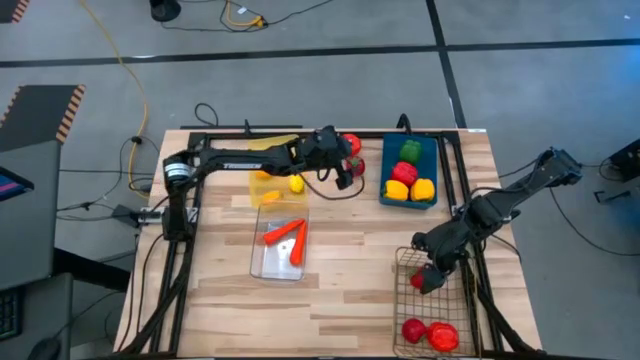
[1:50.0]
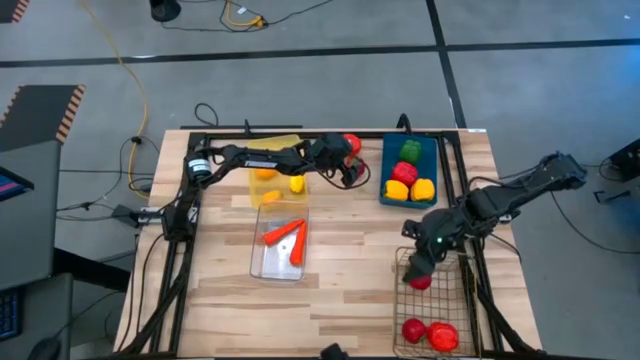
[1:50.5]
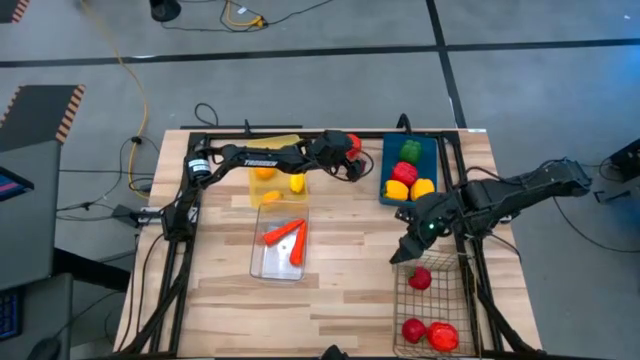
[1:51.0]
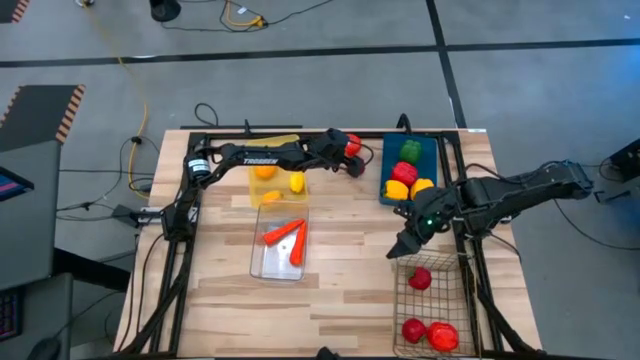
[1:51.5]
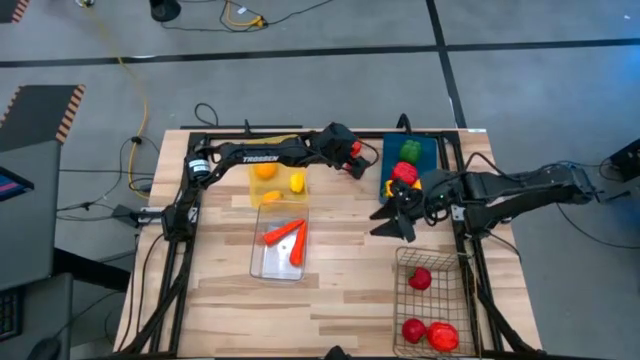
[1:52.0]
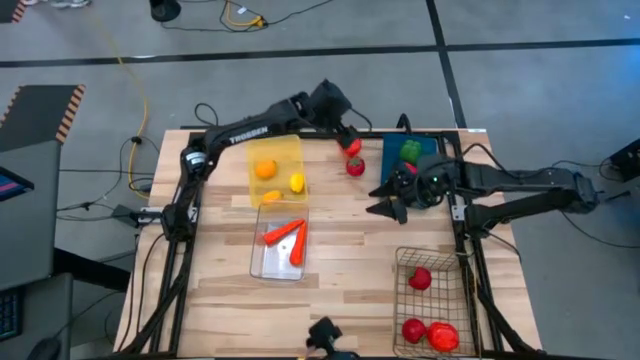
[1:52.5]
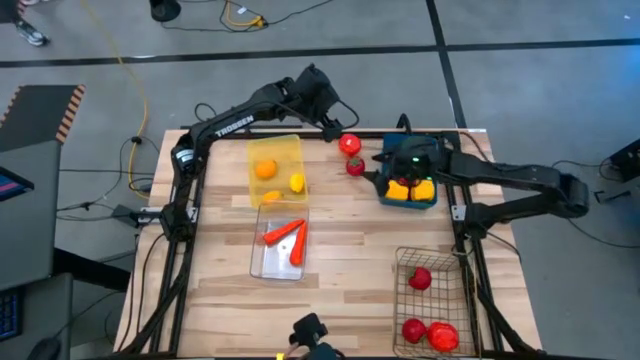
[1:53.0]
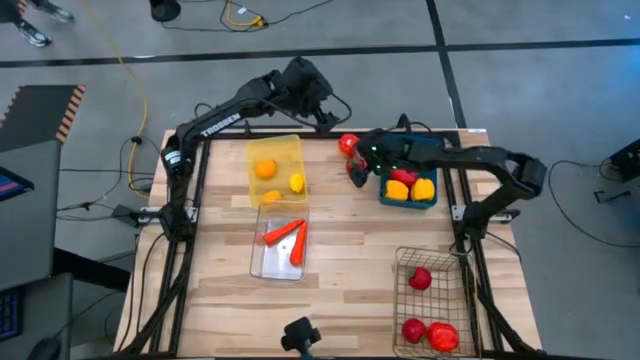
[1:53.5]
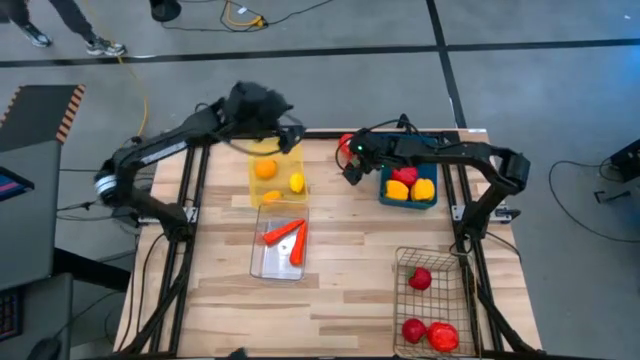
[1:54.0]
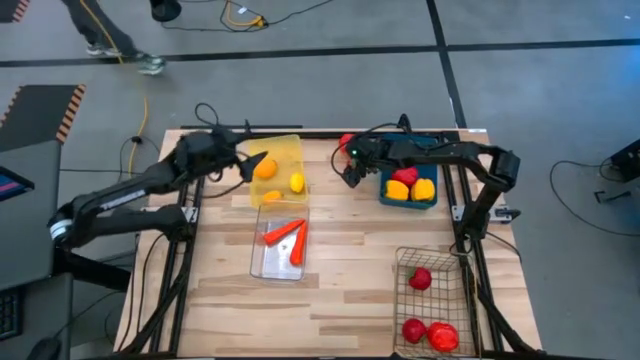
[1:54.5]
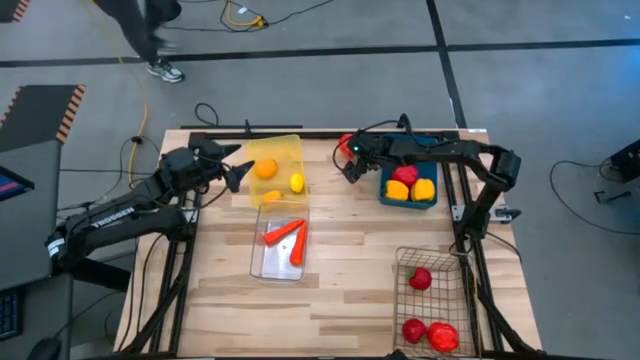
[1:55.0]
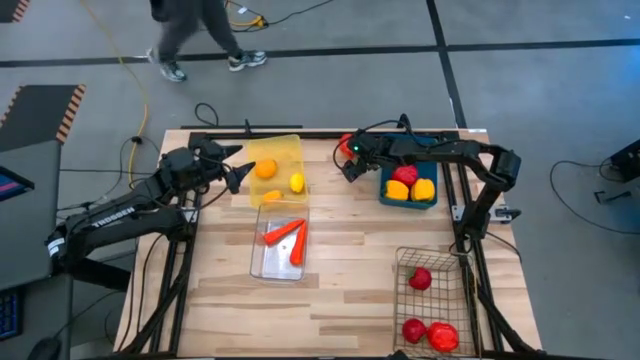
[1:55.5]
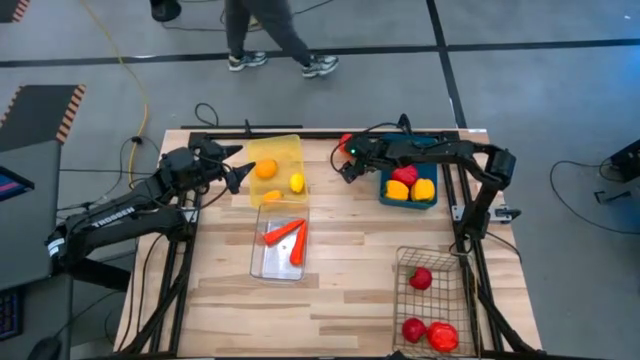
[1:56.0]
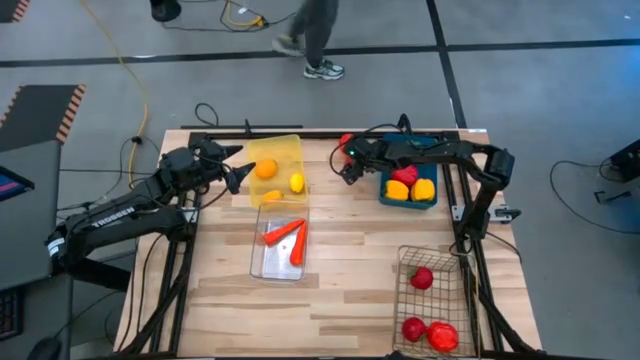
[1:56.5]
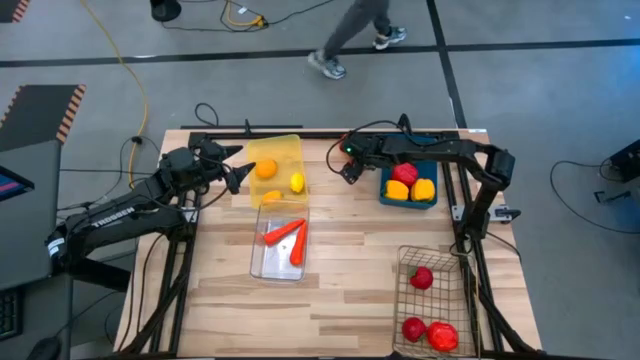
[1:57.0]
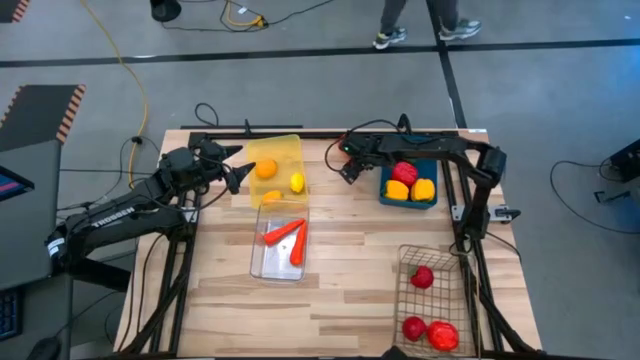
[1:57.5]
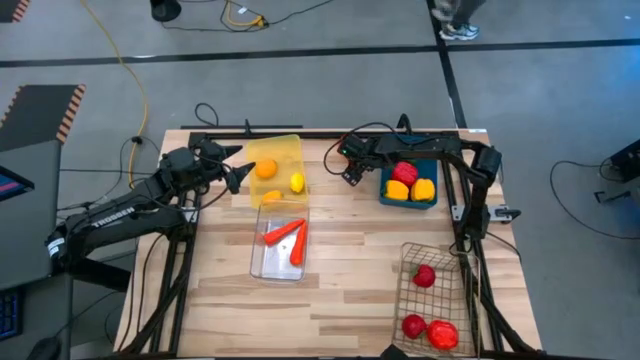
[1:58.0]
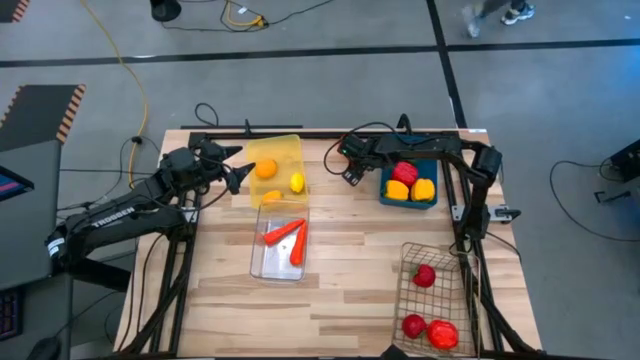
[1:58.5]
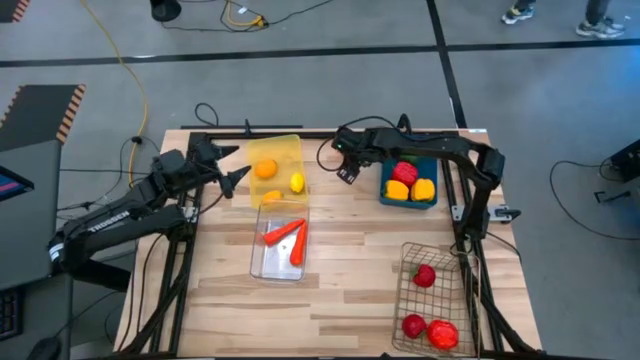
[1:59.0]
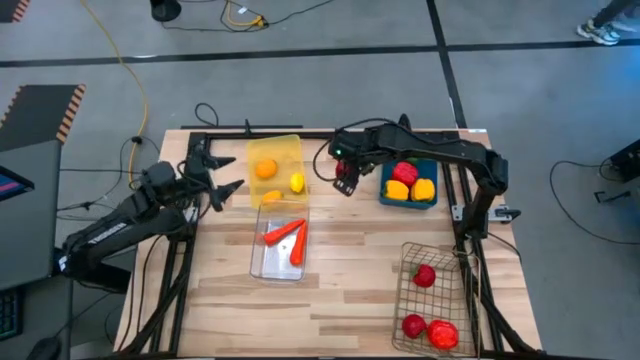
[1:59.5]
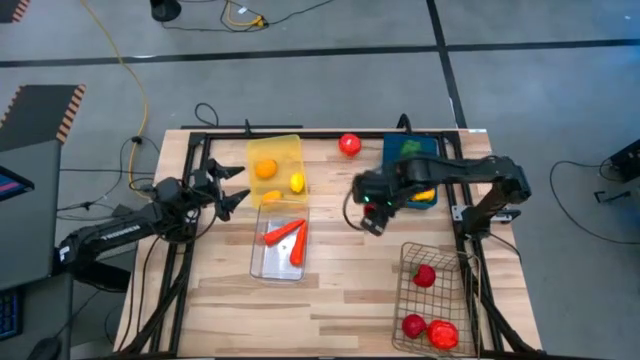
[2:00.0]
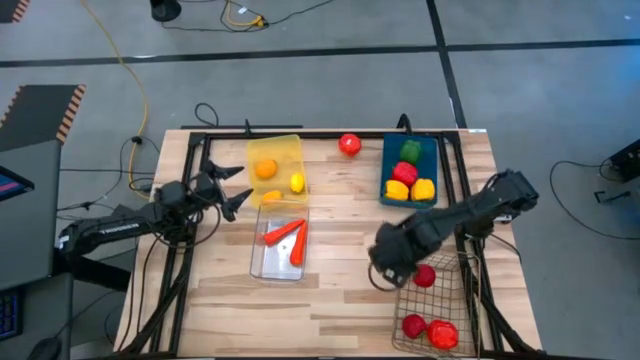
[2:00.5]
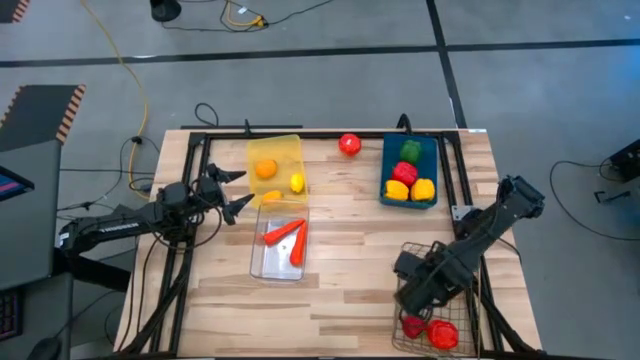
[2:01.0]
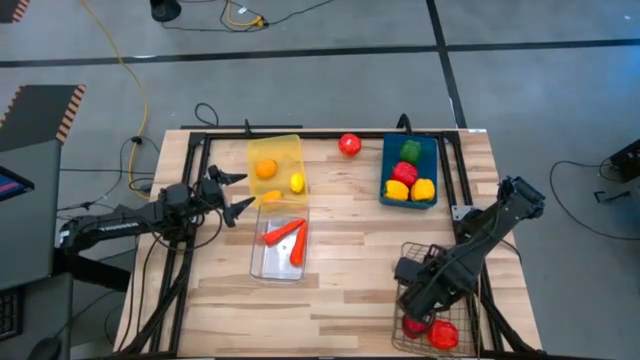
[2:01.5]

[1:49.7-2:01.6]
Task: Sort produce into baskets
Put the red tomato into the wire basket

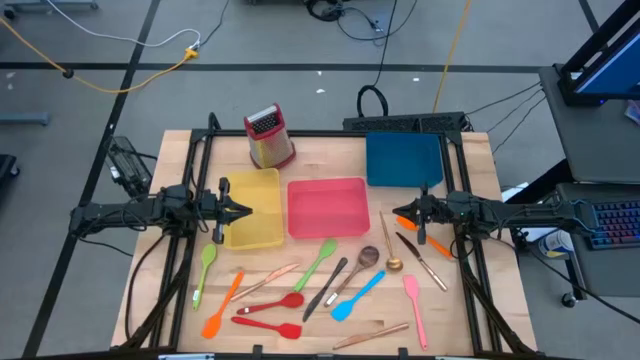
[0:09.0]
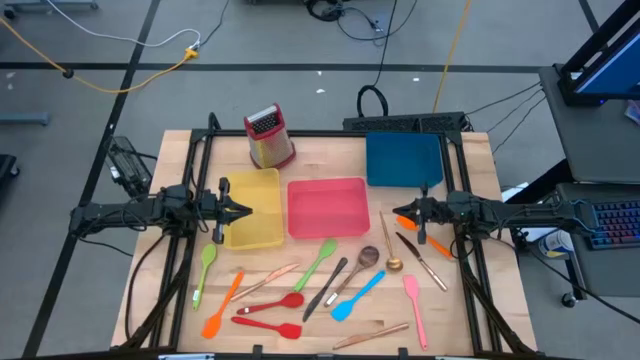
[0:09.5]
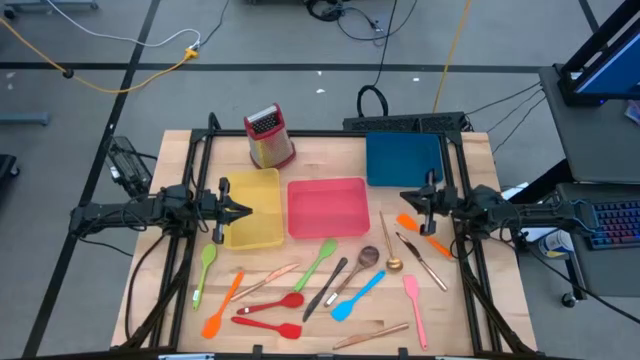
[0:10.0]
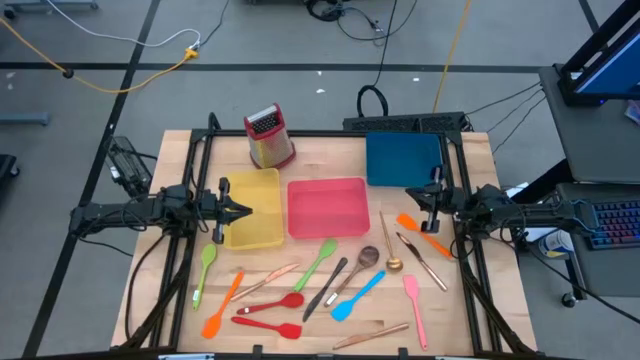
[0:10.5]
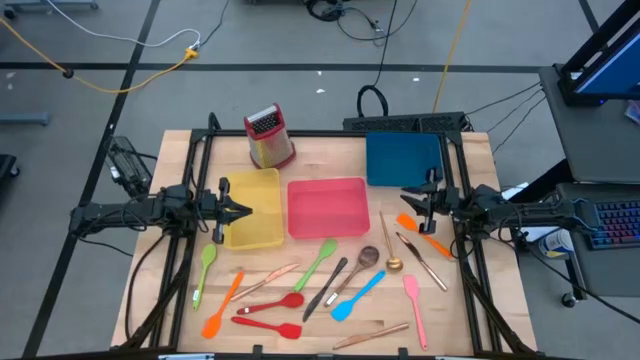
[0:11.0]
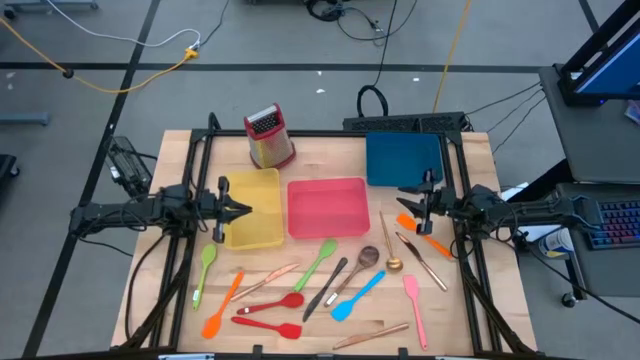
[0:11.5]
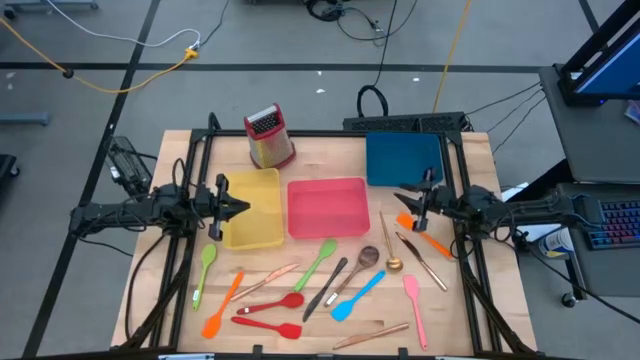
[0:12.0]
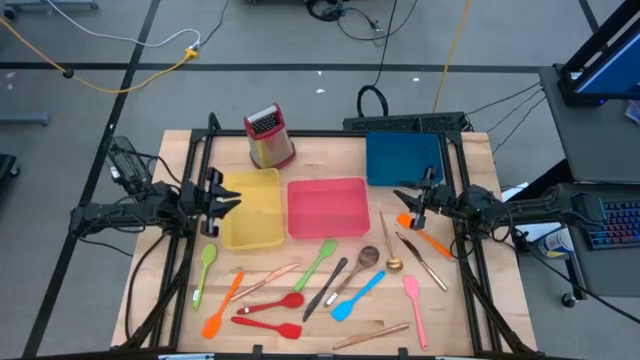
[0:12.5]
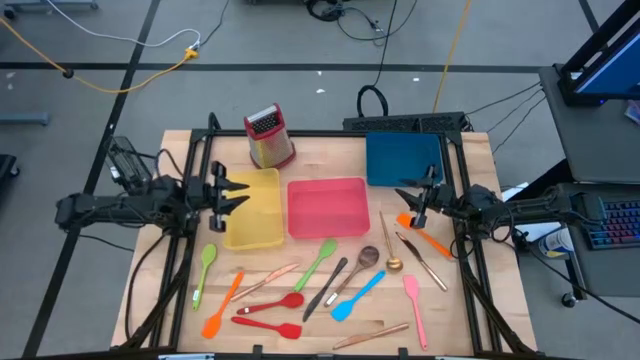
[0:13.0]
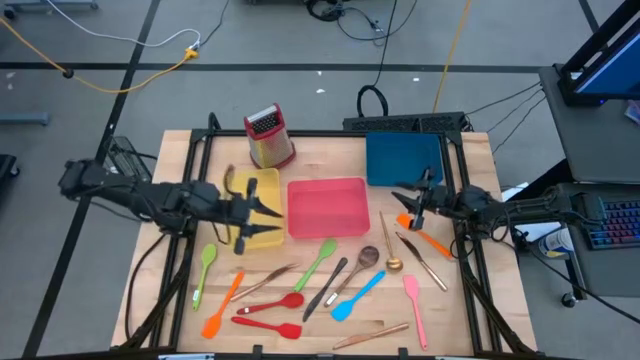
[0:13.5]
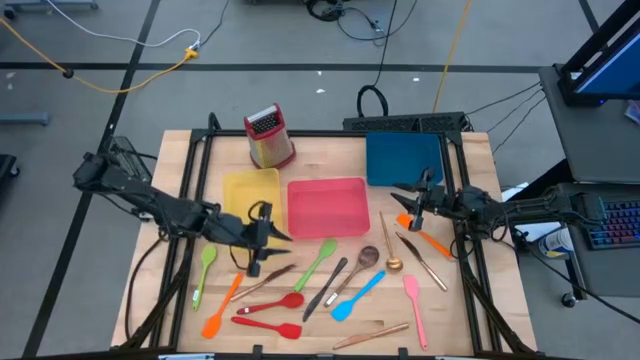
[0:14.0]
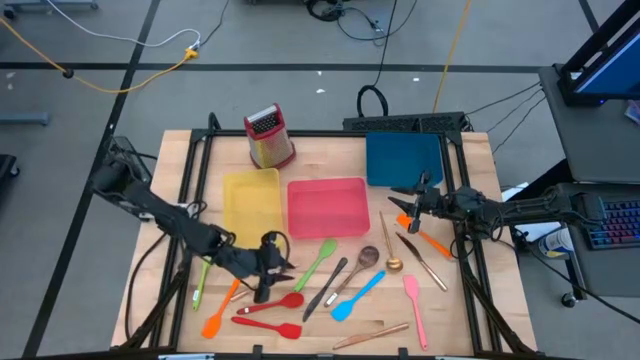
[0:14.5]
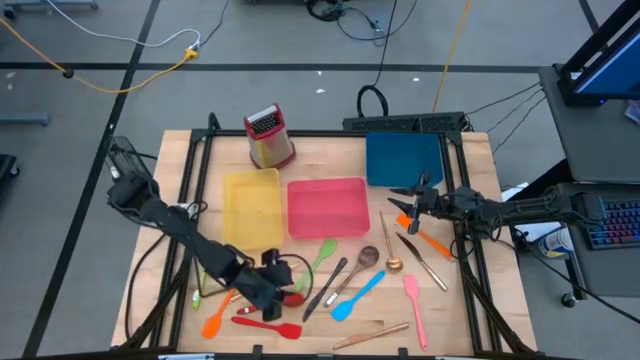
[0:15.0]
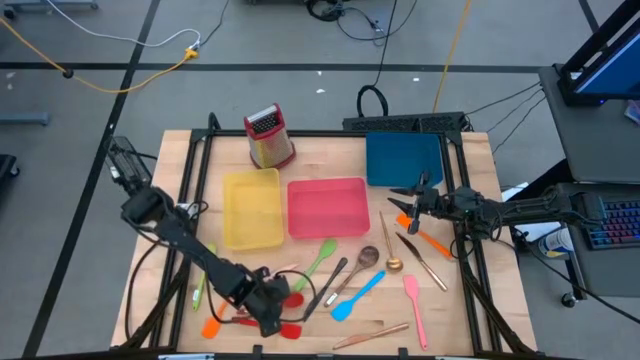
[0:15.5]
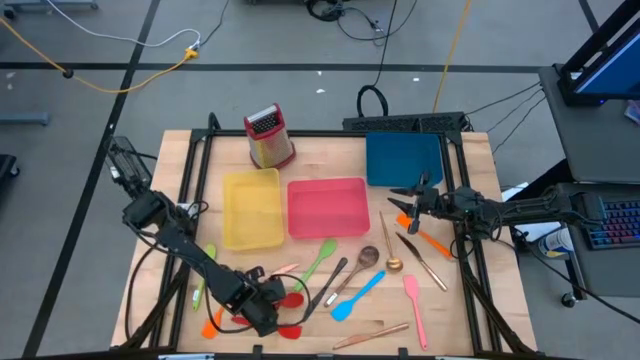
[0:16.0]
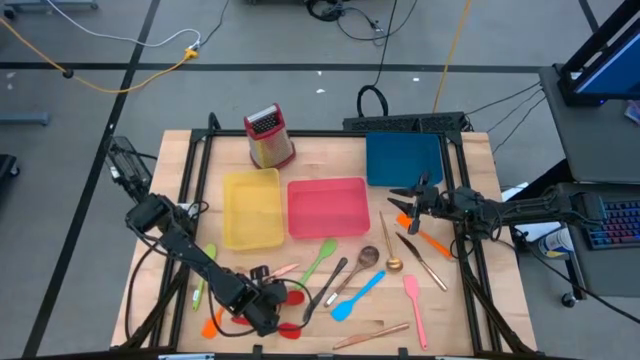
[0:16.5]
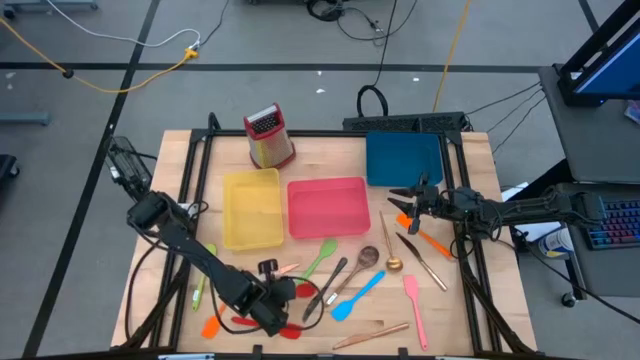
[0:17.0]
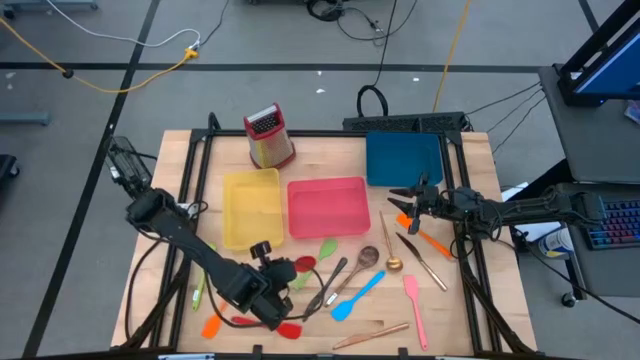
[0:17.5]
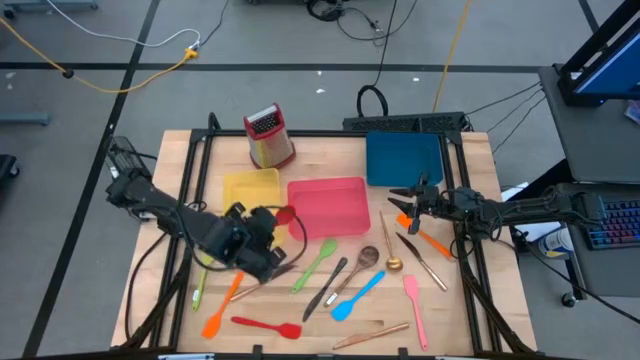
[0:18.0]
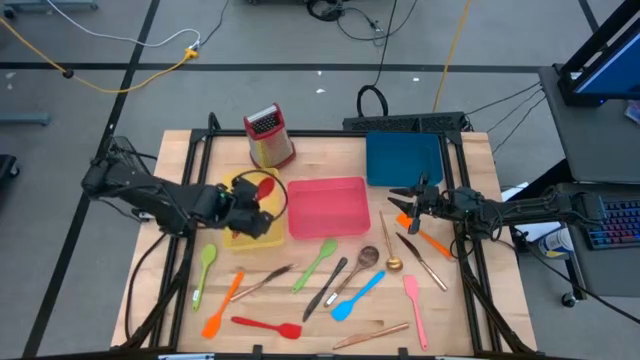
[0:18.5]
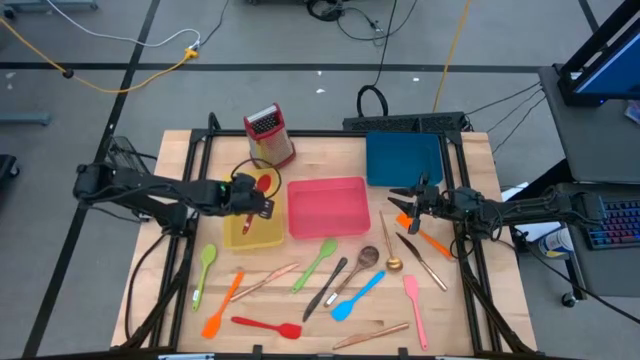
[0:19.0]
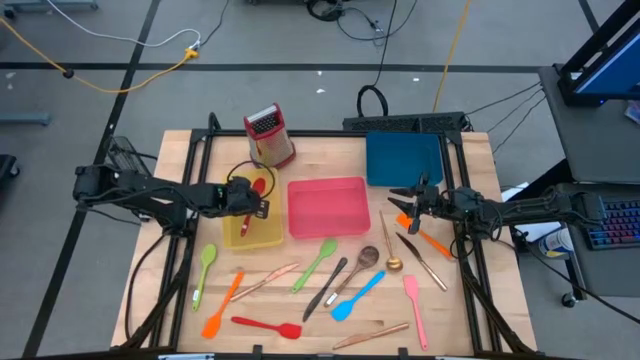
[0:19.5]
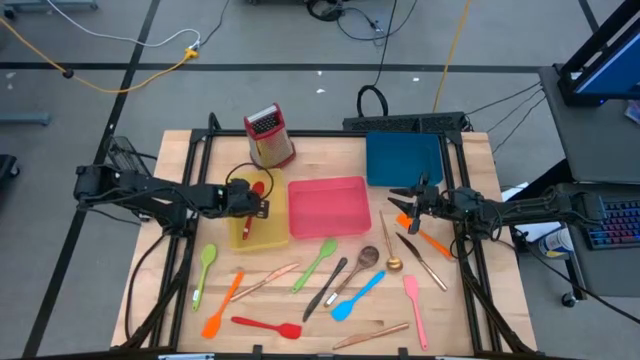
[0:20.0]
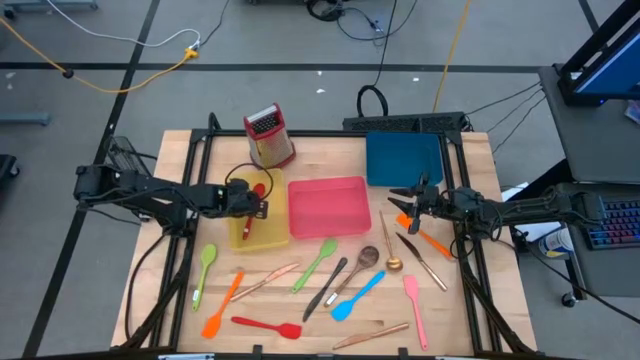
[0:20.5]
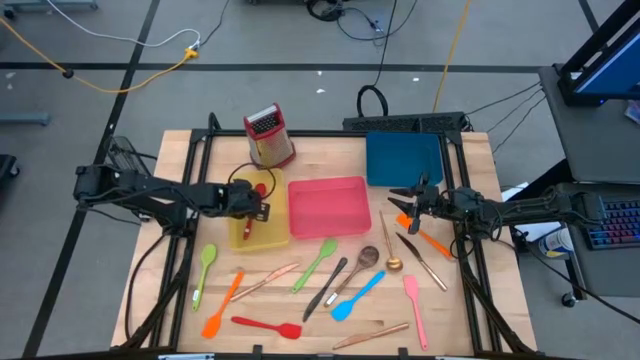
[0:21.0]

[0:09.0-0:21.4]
Task: Pick & Place Kitchen Items
Put the red serving spoon into the yellow bin
